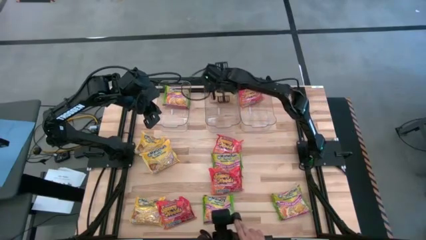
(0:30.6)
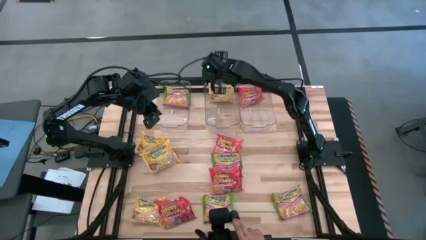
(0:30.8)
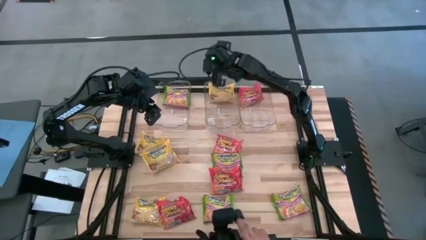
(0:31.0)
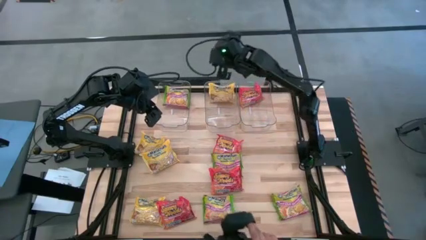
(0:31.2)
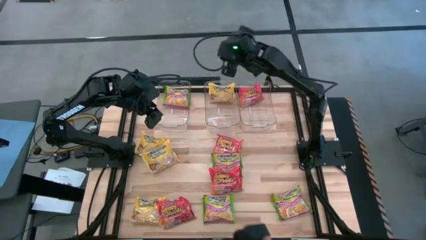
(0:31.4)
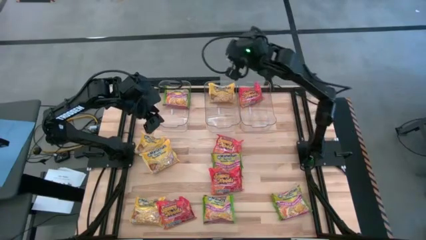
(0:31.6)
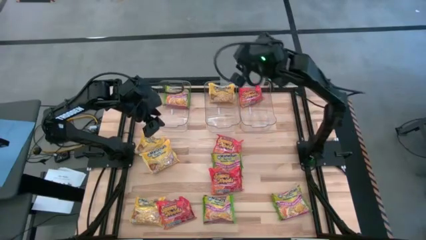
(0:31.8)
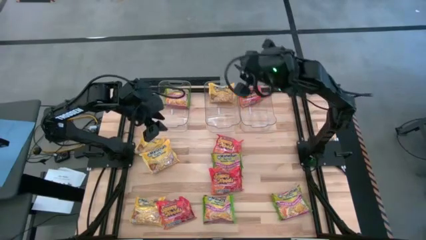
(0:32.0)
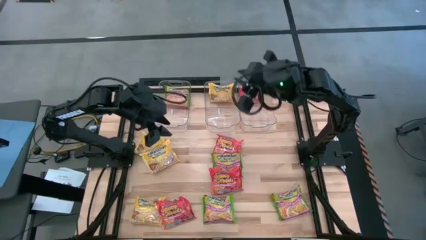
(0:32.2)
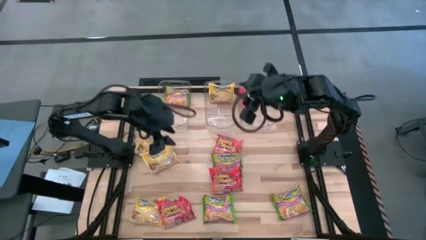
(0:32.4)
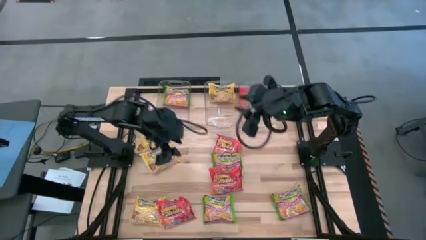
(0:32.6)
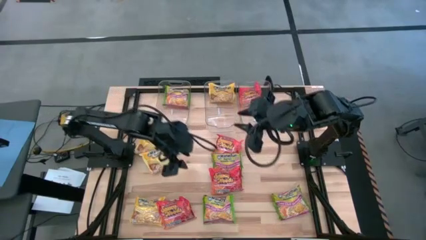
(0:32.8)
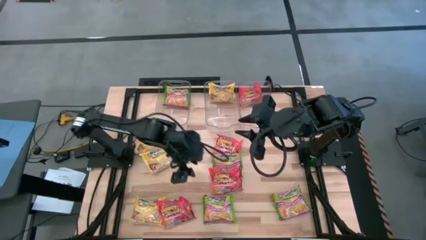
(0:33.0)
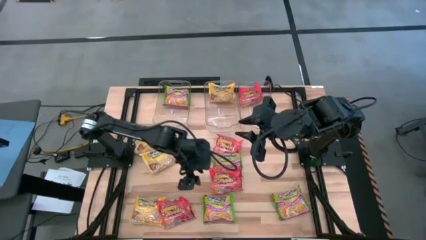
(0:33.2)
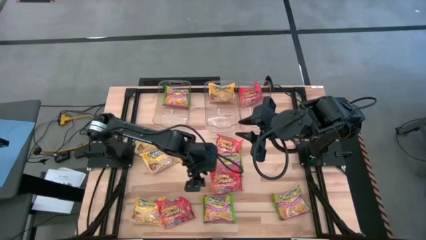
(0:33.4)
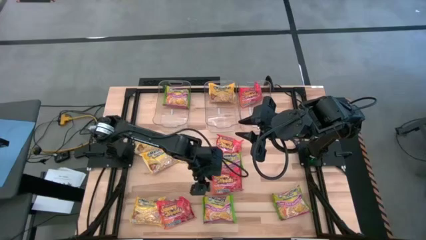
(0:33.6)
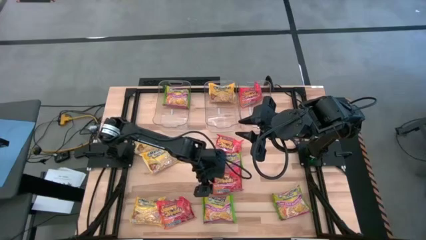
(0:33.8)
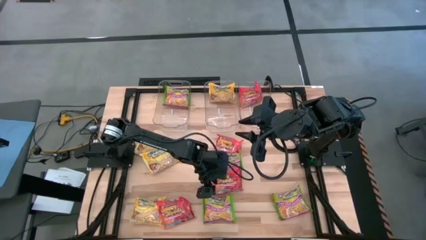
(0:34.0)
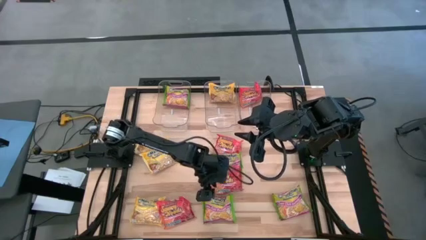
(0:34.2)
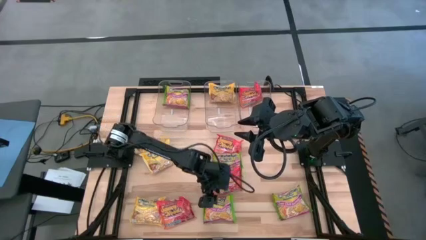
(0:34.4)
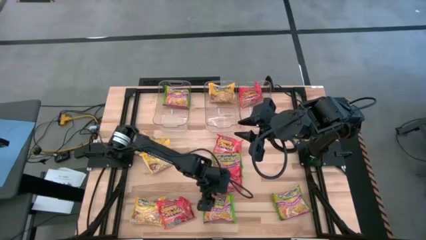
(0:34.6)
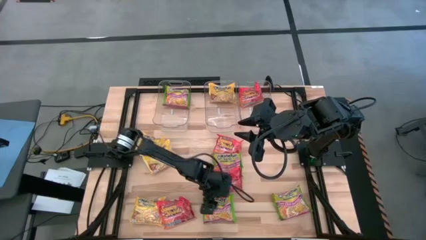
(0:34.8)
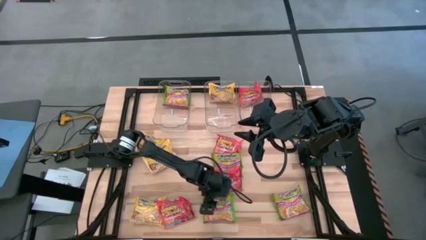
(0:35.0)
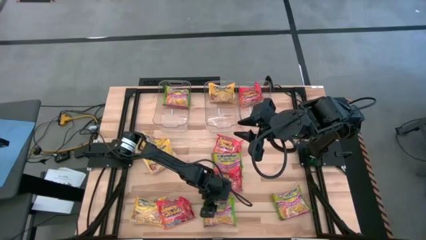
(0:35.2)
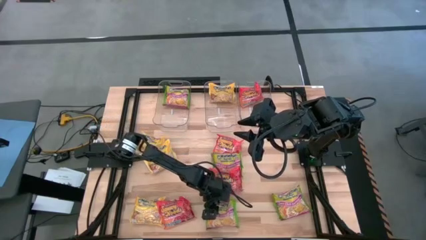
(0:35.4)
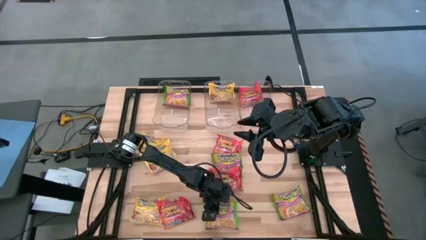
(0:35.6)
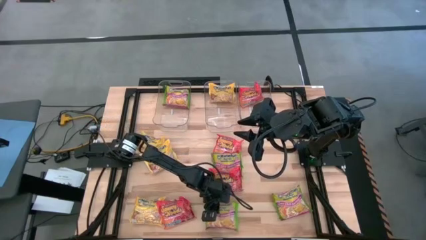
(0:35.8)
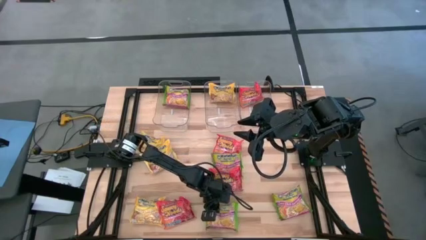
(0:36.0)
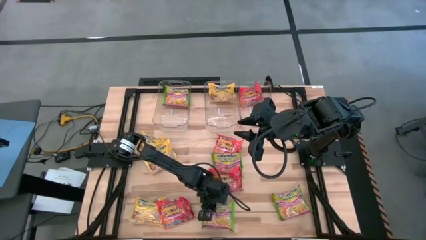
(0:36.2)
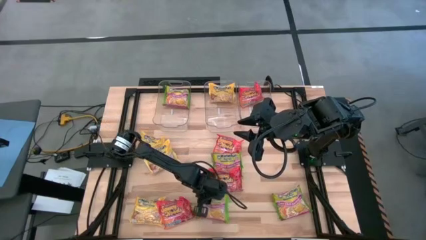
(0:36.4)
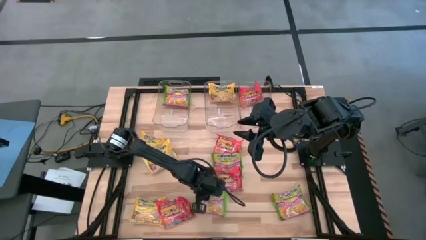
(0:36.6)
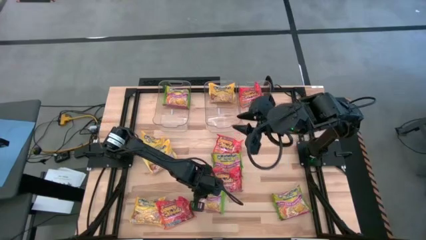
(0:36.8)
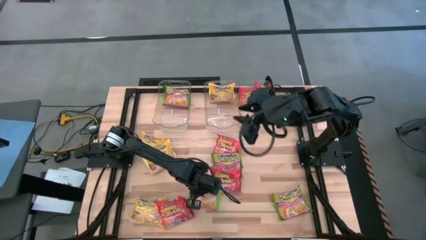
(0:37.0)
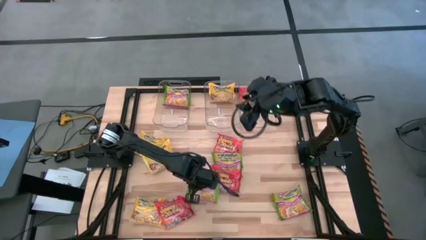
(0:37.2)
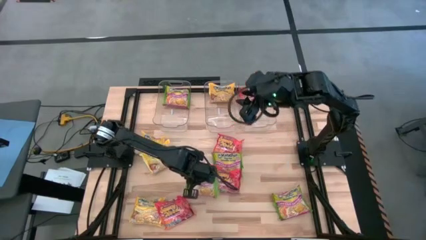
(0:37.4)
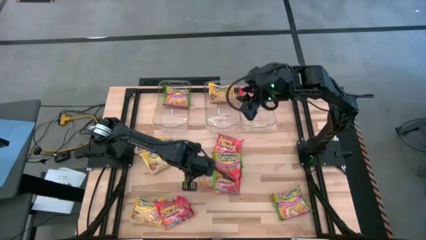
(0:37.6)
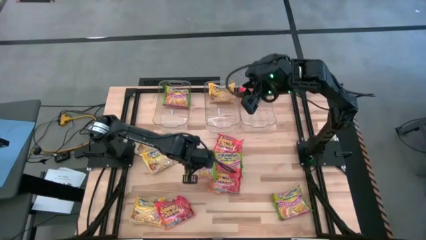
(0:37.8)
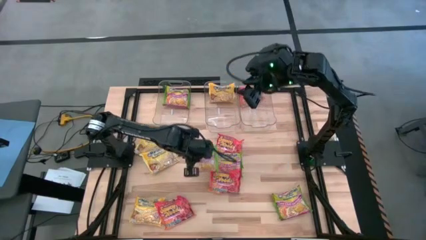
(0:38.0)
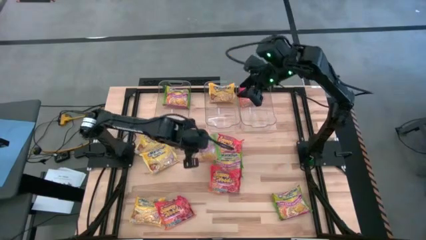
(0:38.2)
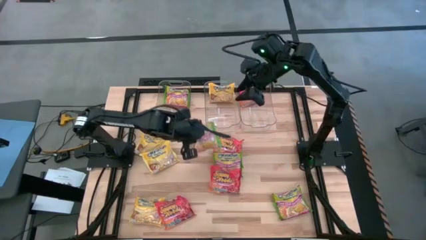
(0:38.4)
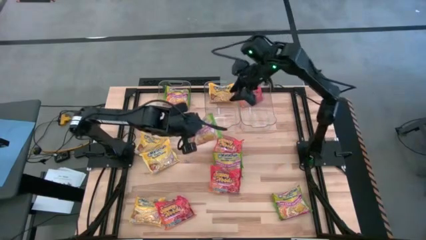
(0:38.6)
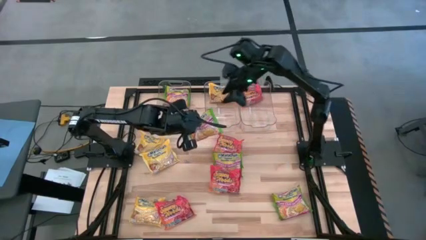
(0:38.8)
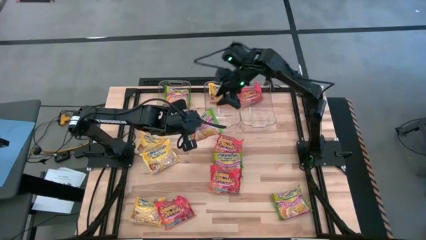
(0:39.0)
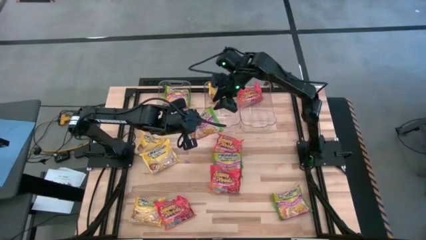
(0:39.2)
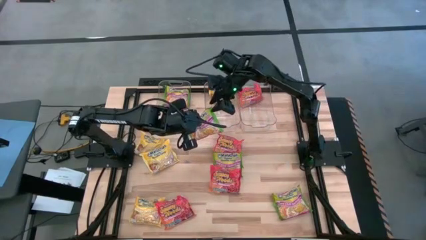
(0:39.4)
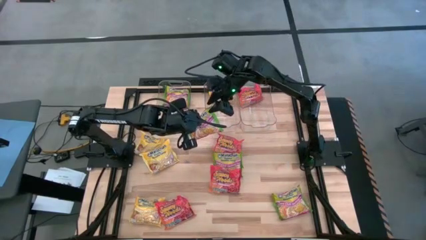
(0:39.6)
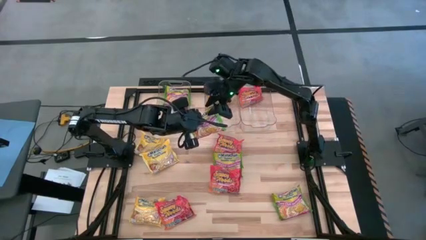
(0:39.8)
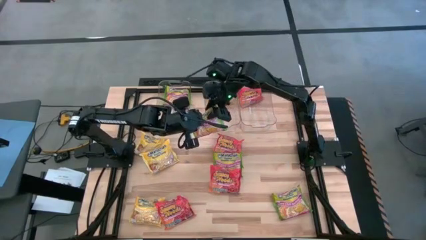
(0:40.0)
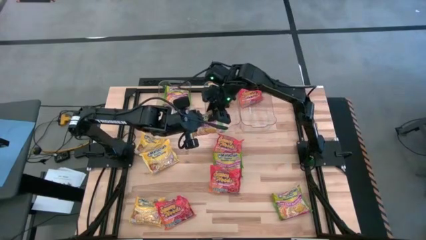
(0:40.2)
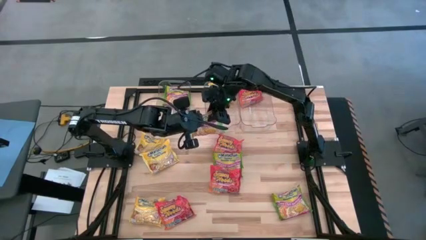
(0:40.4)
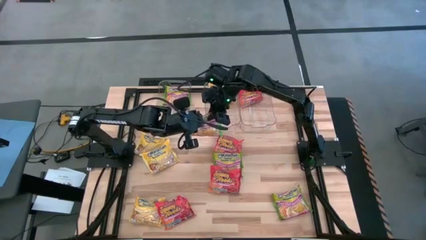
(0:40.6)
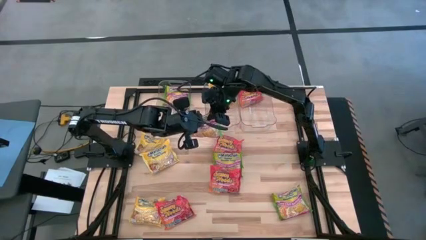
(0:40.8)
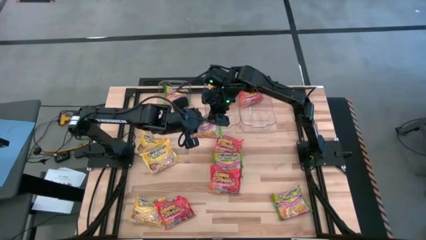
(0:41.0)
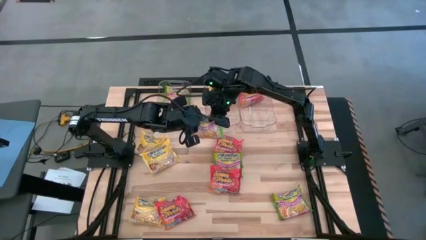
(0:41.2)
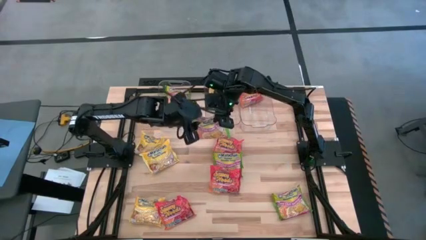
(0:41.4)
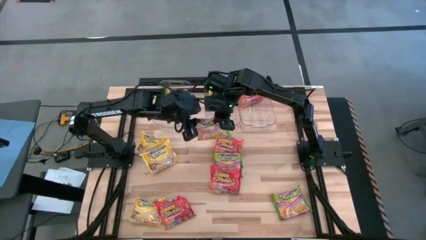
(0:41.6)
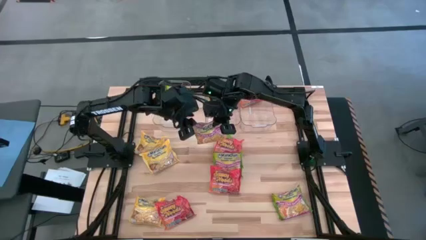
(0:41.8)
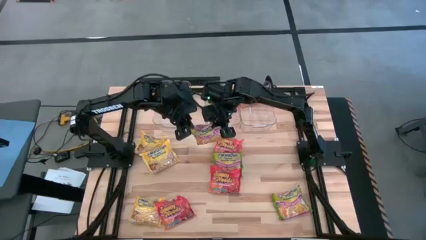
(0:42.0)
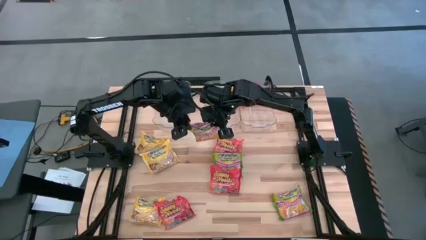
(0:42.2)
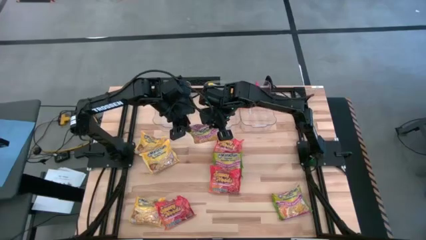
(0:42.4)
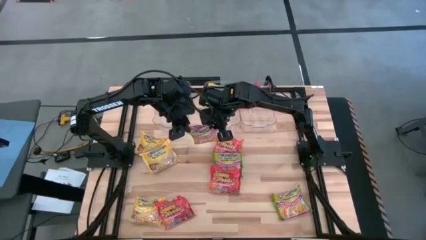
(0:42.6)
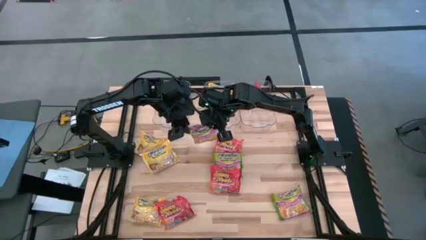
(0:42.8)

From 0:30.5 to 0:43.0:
Task: Sort Maruchan noodles
Put the green noodle pack into the left transparent bin

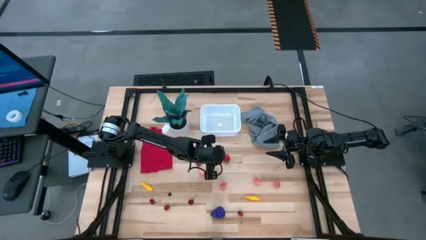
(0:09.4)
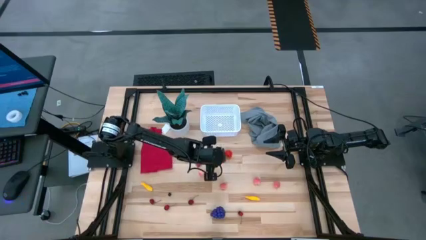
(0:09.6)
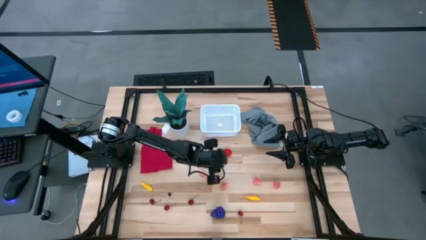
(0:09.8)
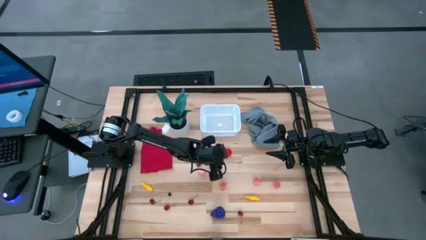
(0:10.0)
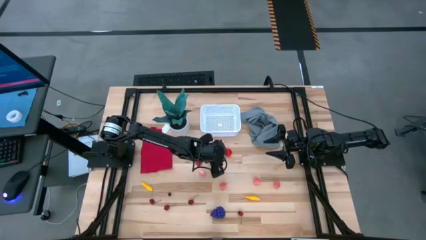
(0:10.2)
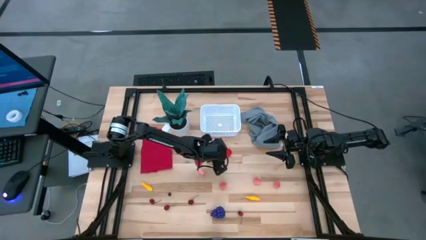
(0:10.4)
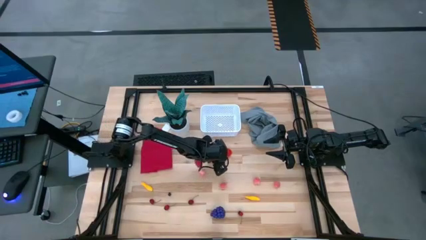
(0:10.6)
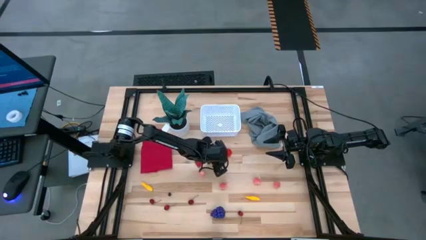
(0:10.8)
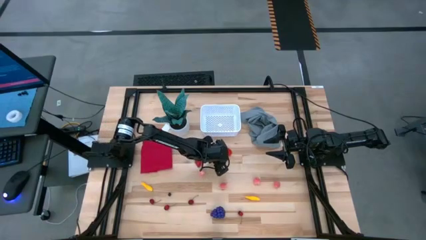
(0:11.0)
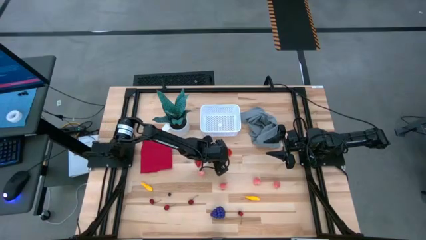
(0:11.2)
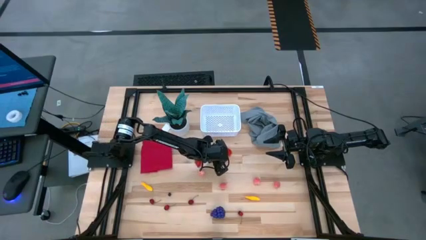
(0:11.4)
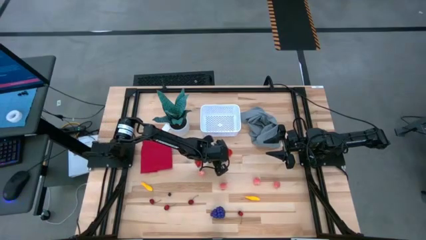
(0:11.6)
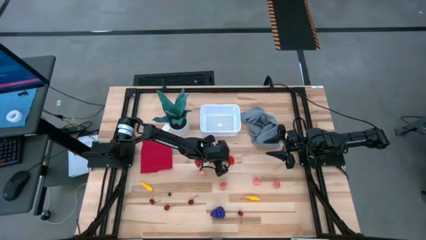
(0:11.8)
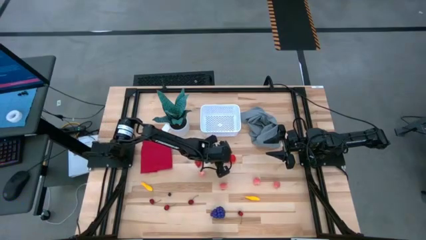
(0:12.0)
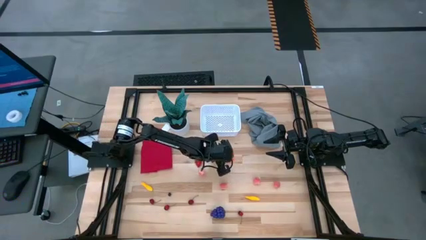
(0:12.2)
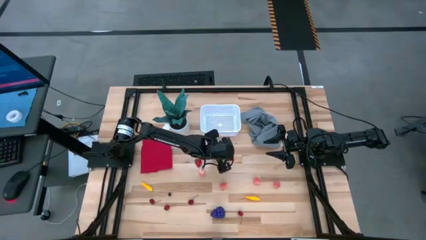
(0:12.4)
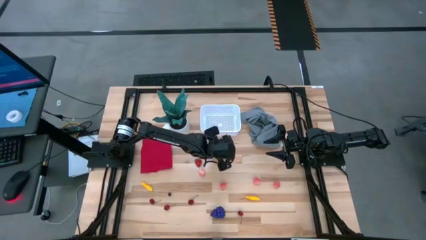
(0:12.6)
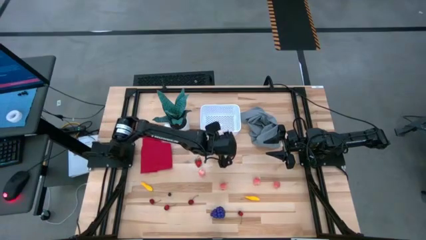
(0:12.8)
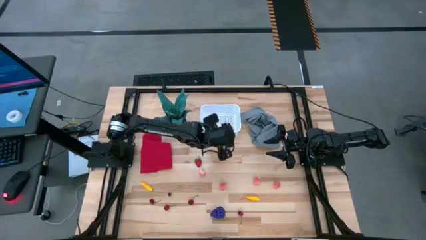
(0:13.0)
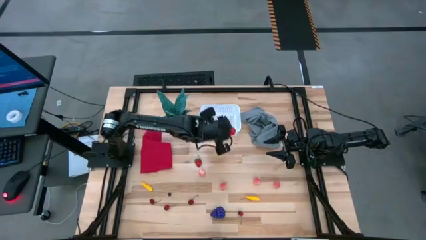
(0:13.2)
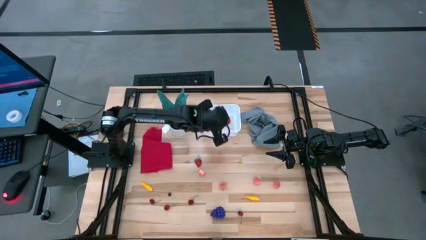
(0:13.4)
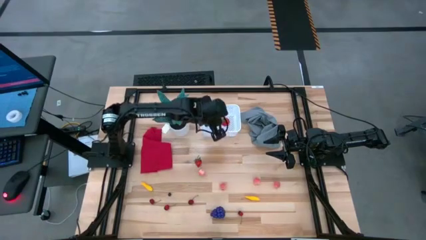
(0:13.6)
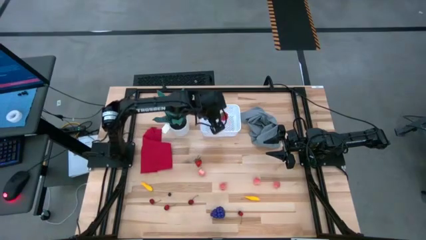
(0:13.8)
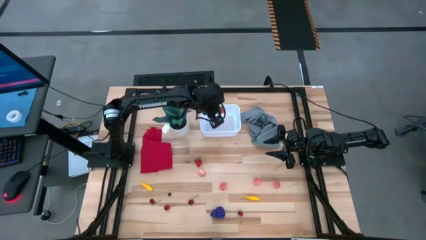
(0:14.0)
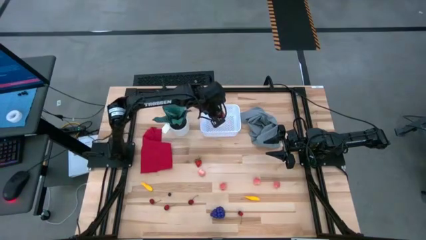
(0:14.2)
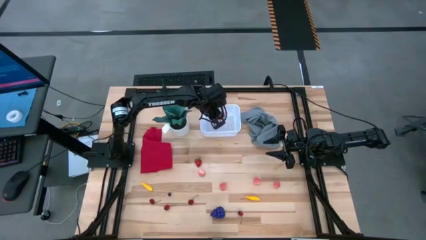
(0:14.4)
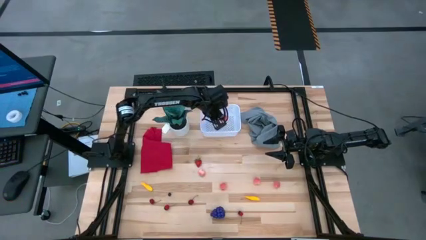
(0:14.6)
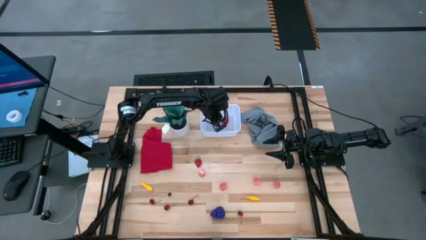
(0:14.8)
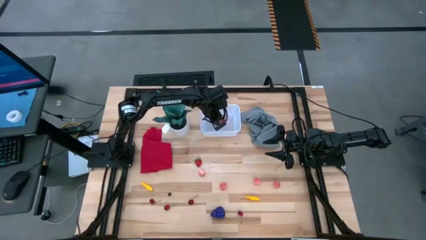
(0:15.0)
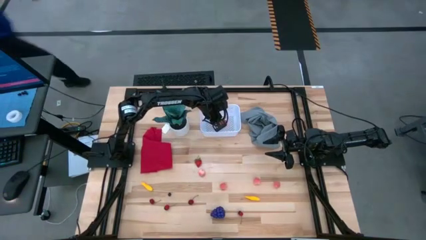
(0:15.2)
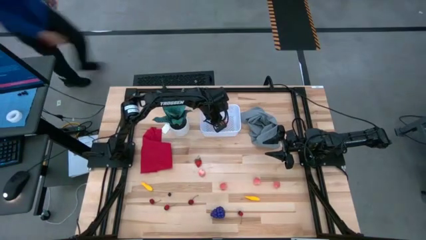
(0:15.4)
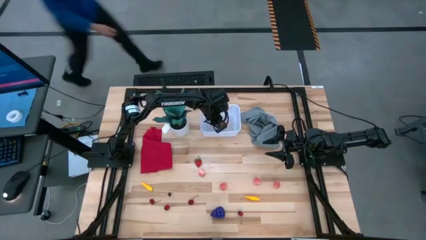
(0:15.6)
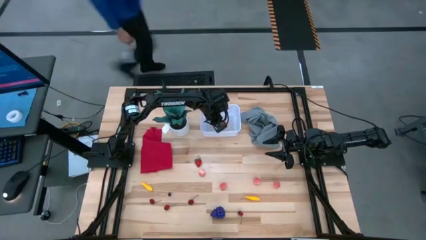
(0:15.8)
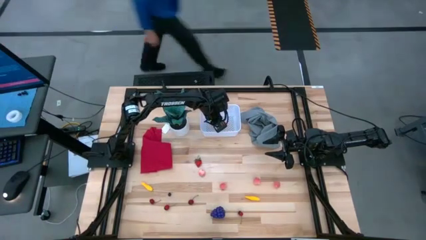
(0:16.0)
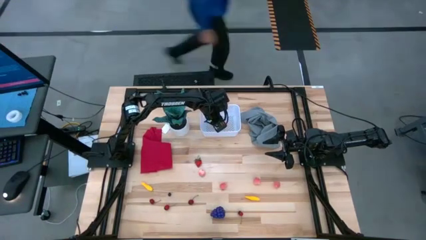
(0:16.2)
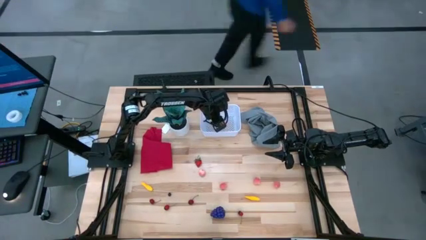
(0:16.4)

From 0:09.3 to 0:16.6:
Task: Pick and placing Produce into tupperware
Put the red strawberry into the white bin
